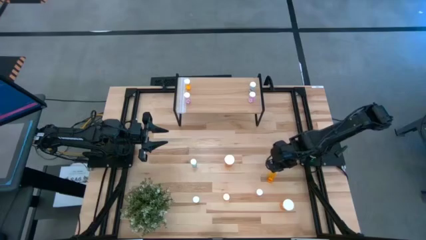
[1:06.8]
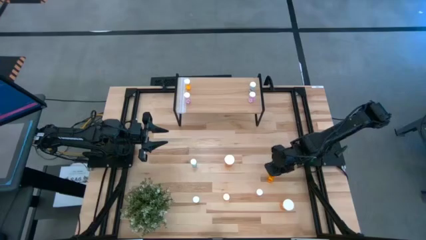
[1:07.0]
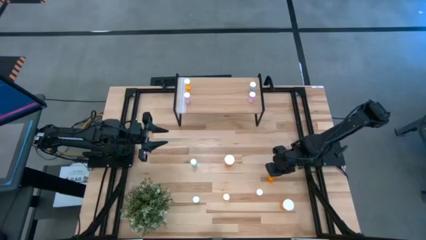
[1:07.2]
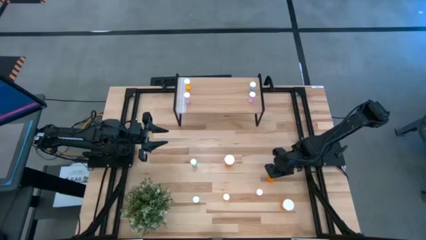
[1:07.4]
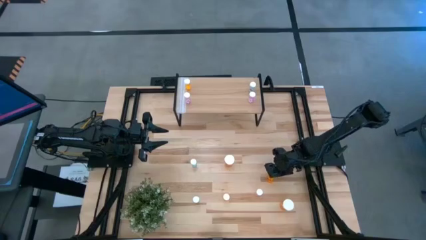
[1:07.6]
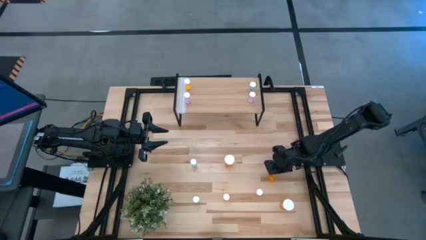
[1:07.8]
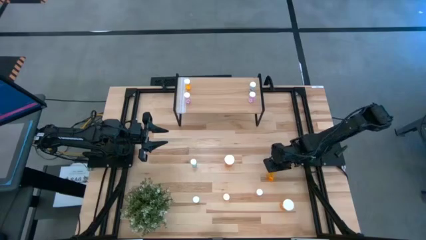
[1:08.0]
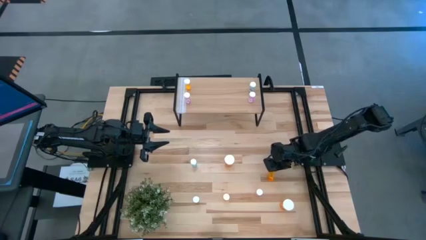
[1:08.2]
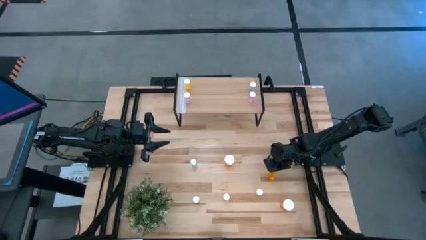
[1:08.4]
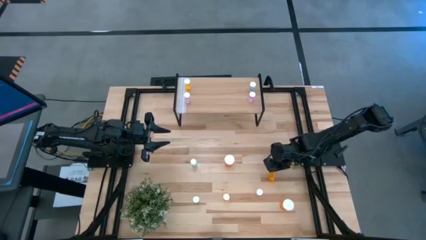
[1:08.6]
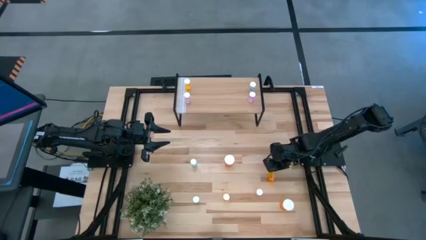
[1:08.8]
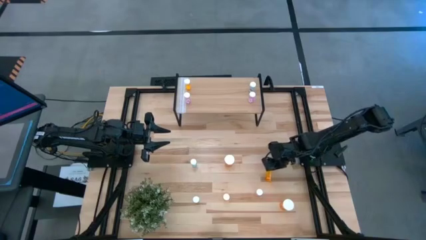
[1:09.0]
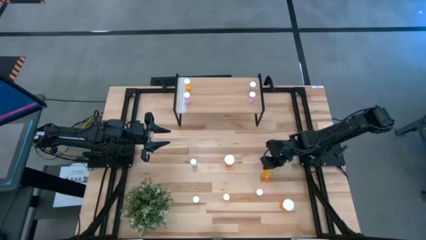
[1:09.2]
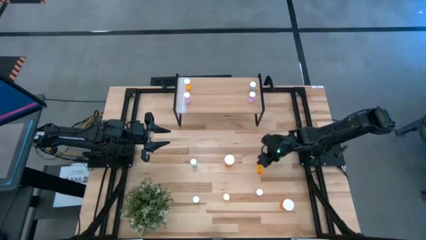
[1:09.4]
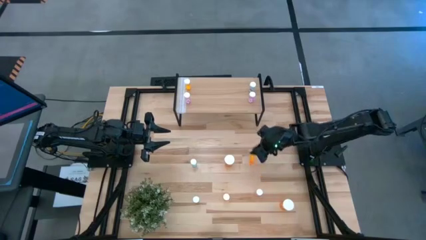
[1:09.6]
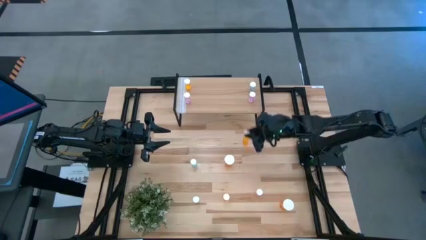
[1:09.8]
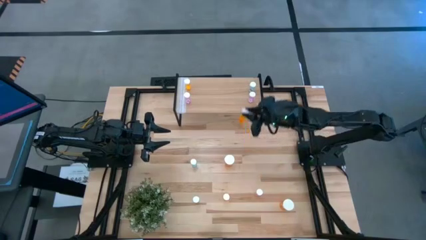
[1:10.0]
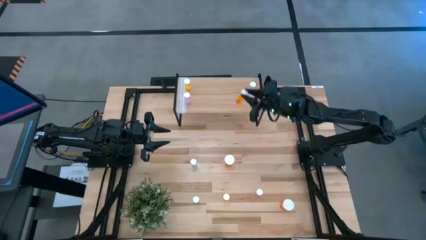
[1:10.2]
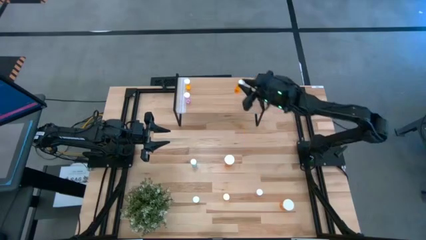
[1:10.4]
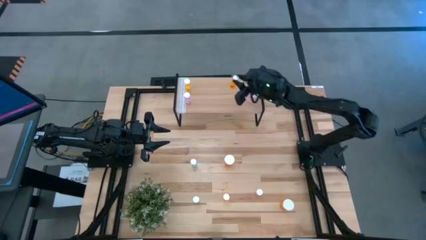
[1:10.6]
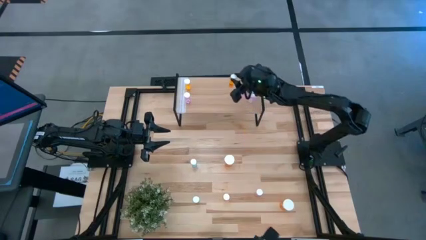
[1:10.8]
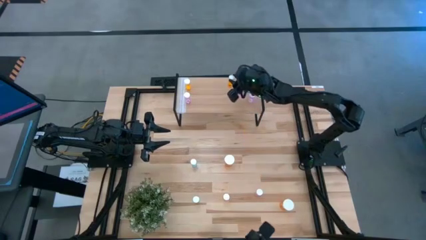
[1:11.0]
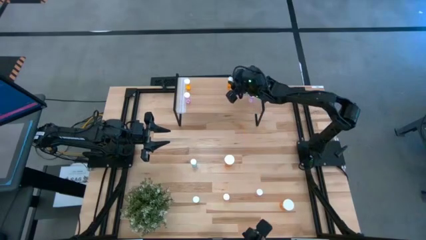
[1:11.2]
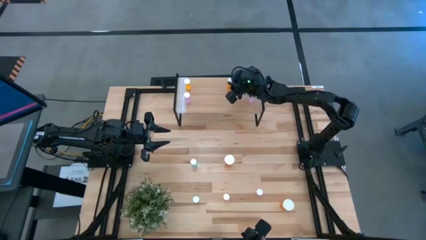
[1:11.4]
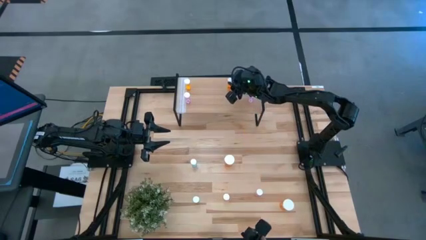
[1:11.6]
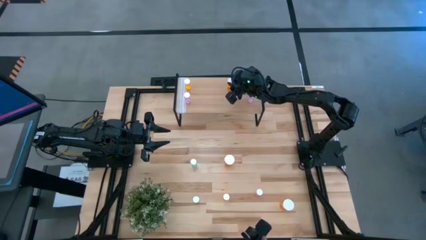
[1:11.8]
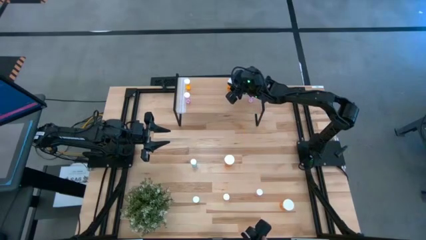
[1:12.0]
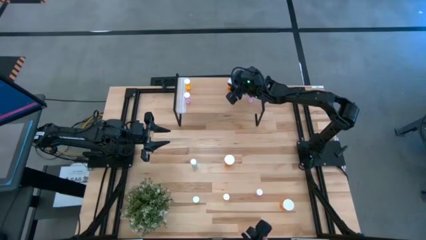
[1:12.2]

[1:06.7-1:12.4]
Task: Pick and place medicine bottles onto shelf by color
Put the light orange pill bottle on the shelf

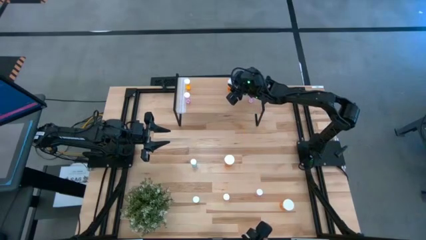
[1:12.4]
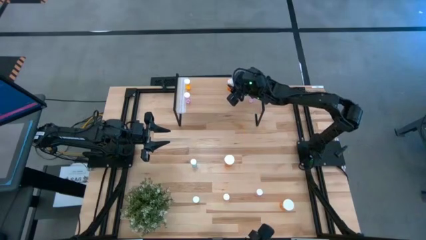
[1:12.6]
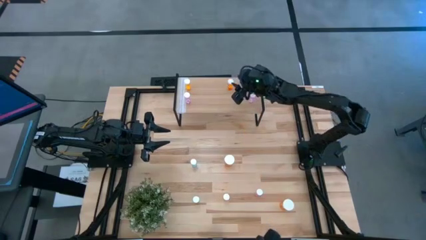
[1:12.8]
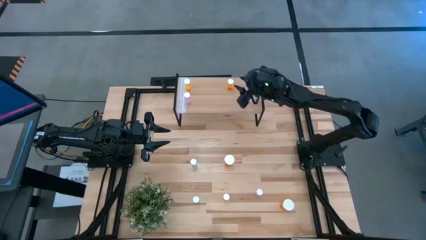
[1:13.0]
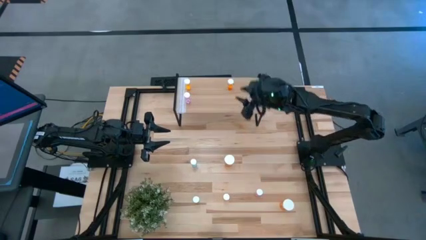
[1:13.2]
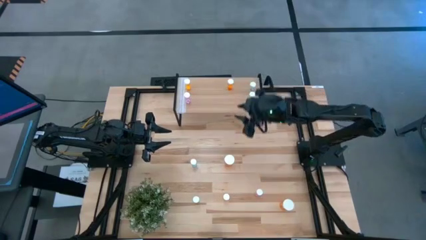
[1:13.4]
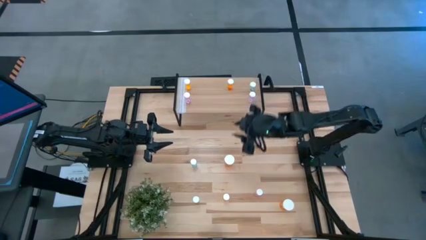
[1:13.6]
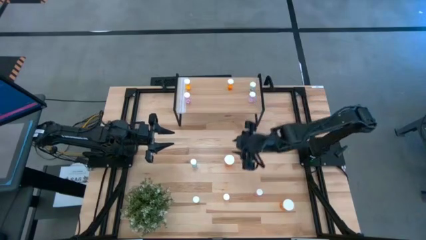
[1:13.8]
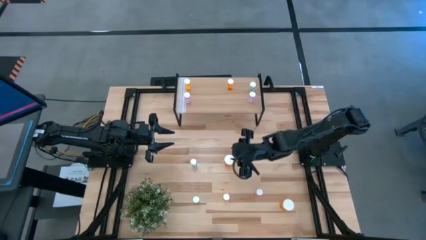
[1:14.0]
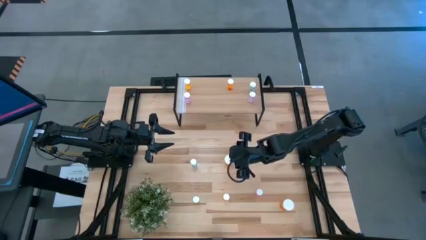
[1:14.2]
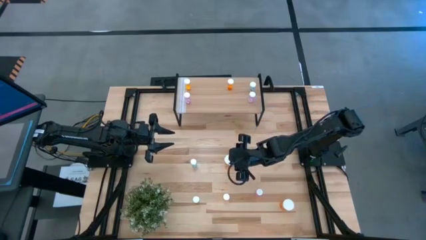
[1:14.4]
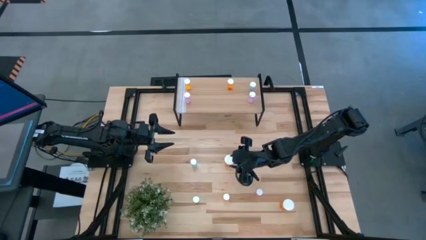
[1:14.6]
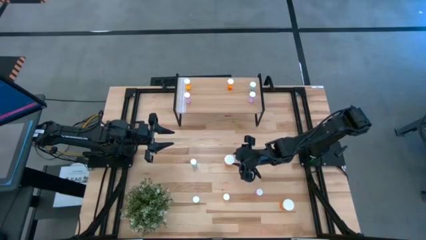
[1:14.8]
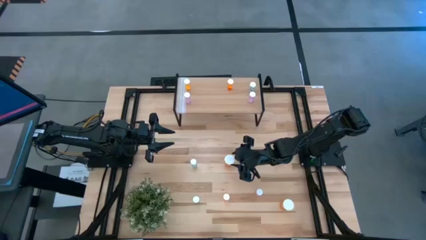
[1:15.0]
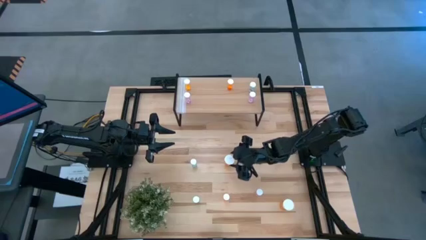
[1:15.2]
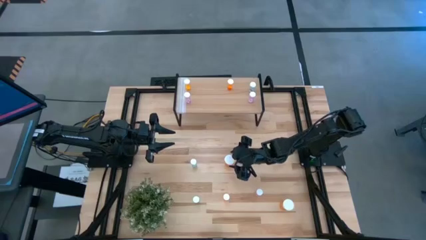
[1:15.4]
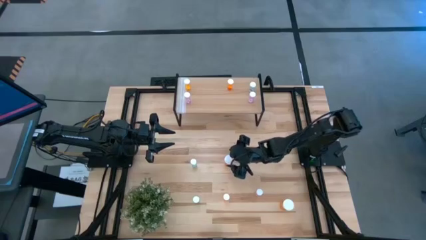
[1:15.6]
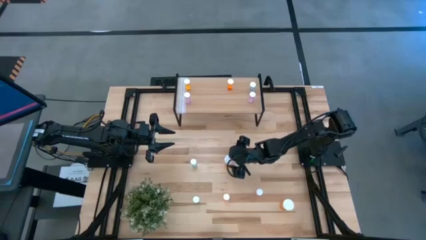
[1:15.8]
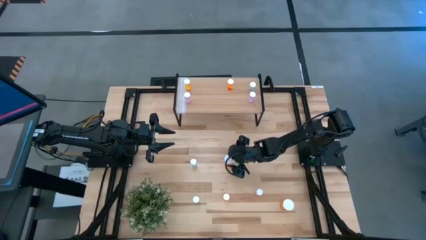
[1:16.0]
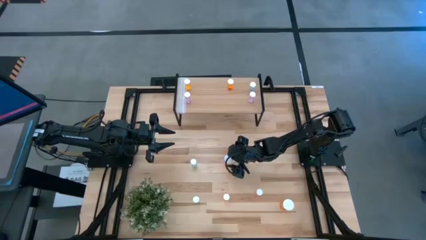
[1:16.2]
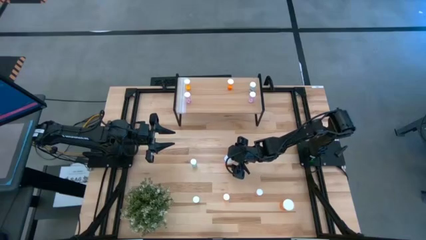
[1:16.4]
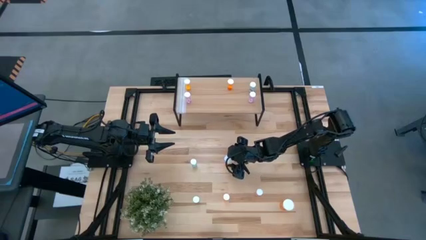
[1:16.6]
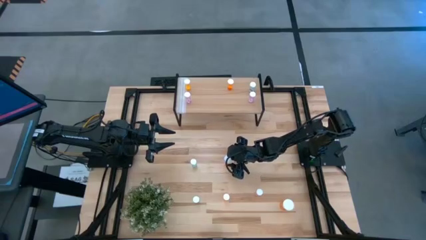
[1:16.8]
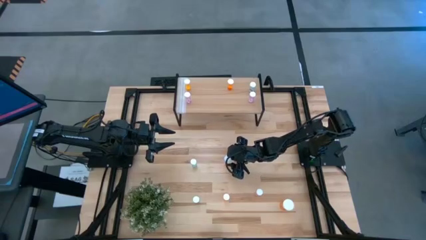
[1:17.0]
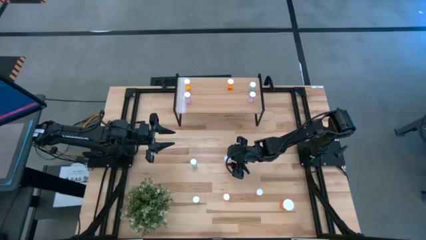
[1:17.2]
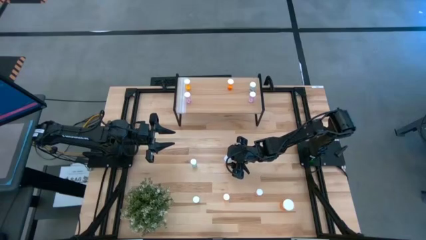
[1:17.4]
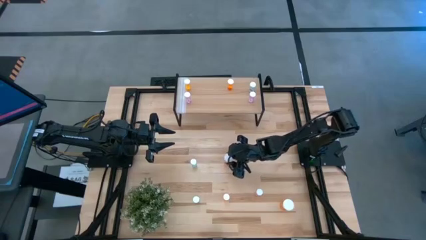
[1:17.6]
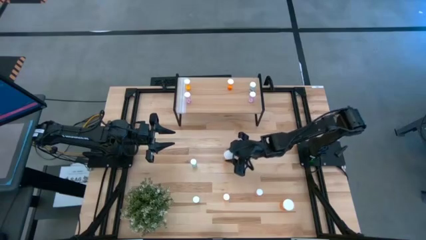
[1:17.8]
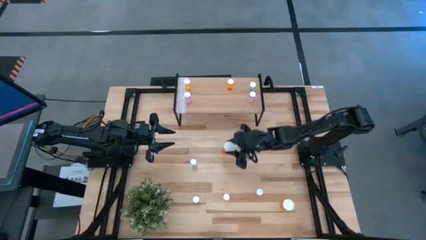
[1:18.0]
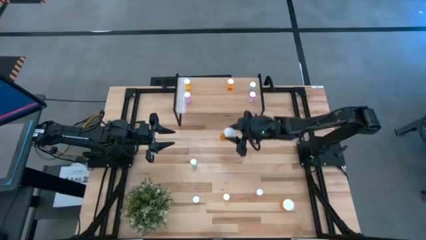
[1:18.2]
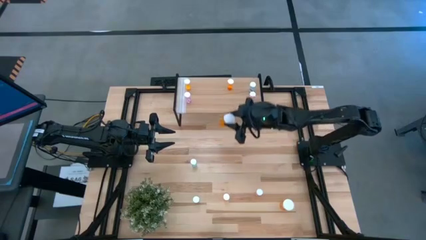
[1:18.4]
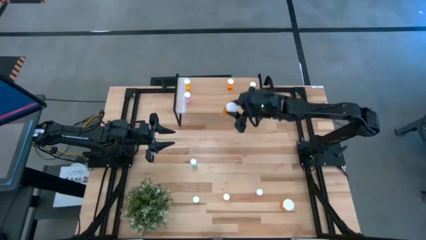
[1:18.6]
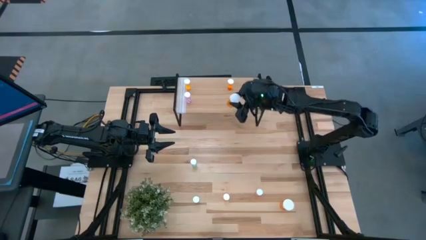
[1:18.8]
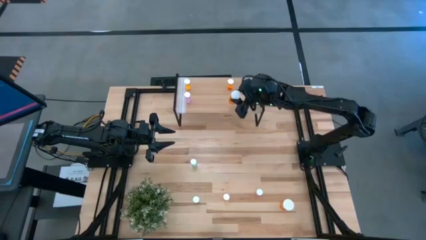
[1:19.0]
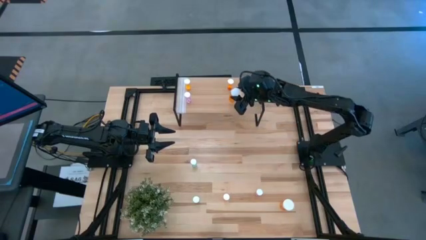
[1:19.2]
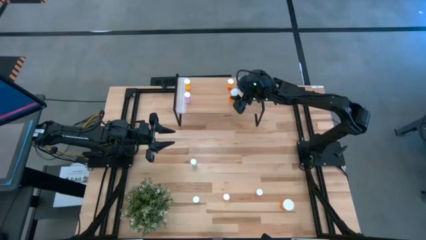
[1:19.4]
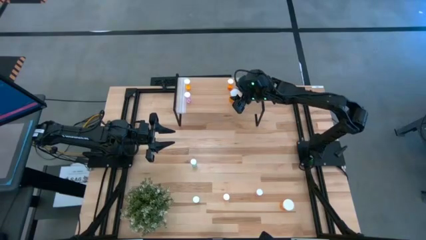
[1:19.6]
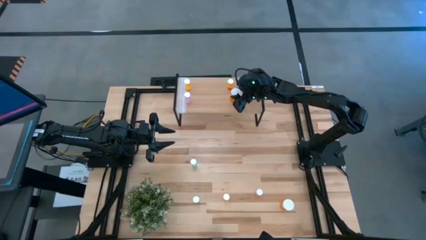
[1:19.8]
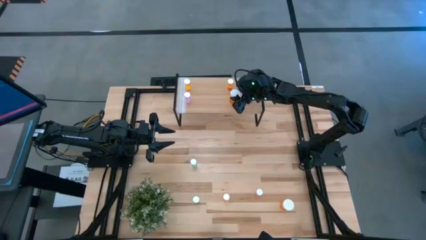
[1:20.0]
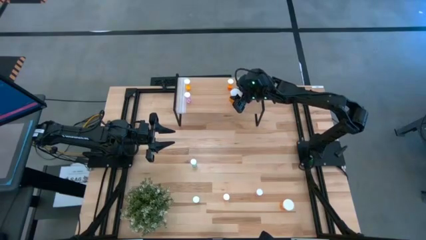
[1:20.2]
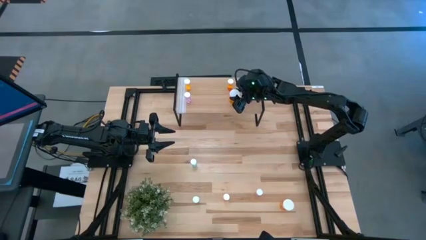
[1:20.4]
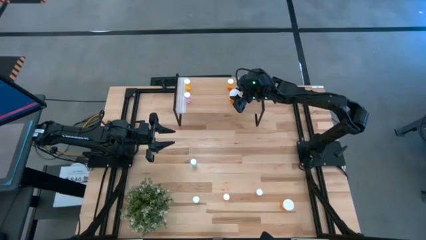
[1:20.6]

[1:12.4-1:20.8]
Put the orange pill bottle on the shelf
